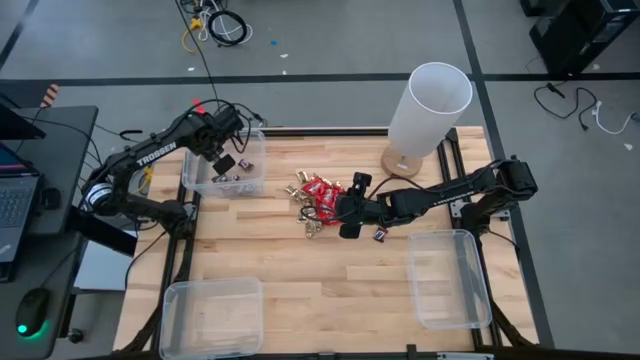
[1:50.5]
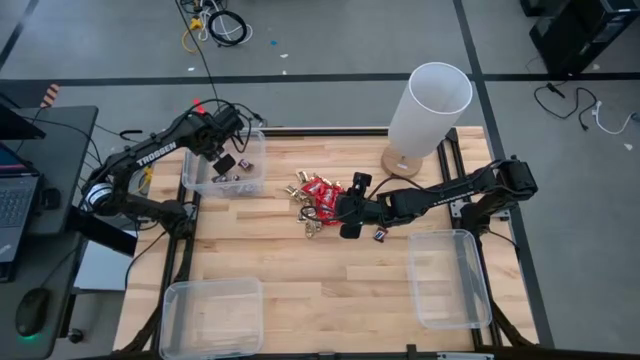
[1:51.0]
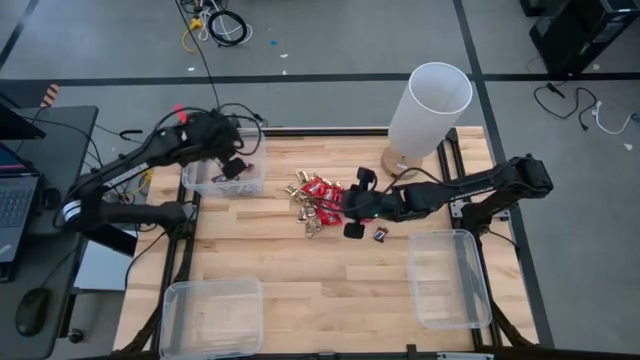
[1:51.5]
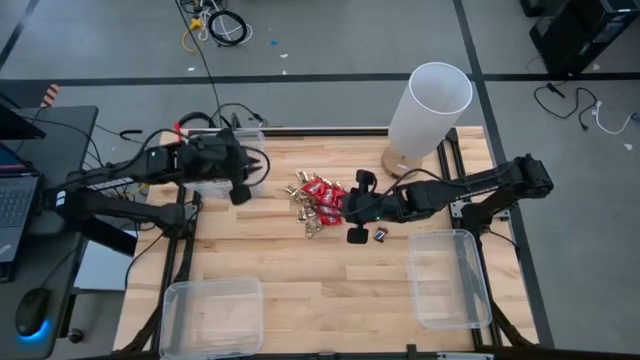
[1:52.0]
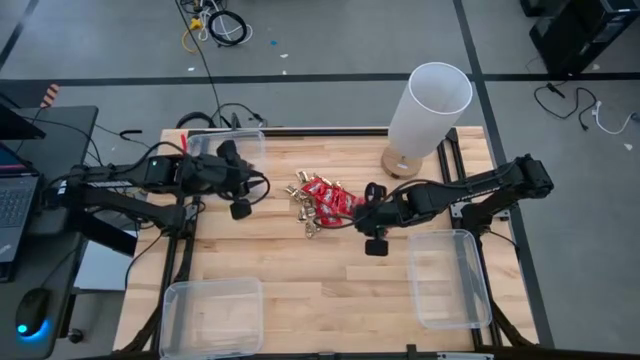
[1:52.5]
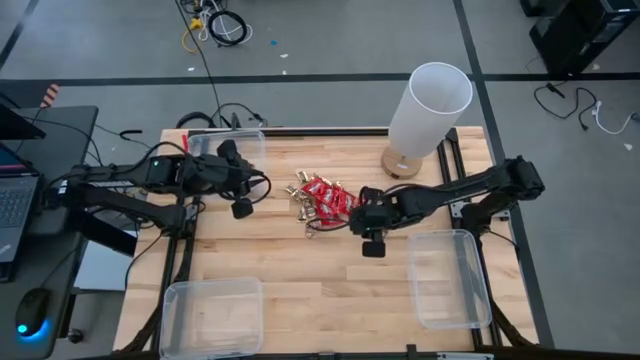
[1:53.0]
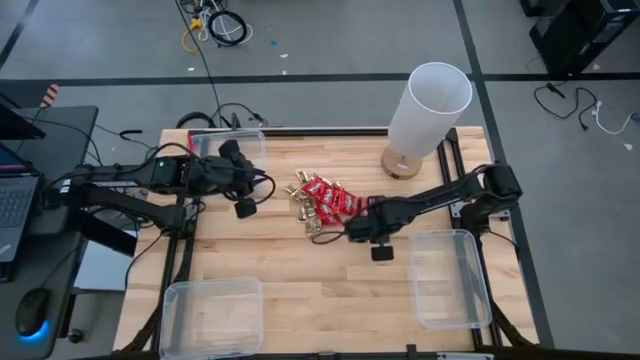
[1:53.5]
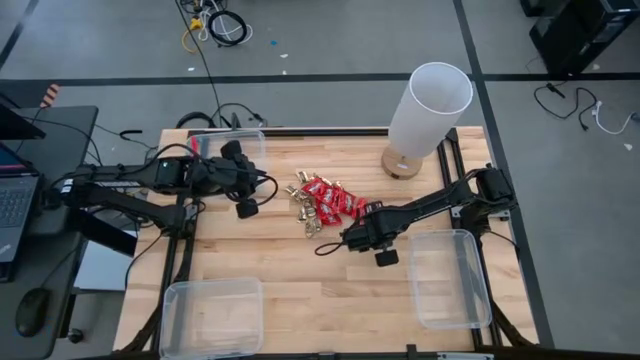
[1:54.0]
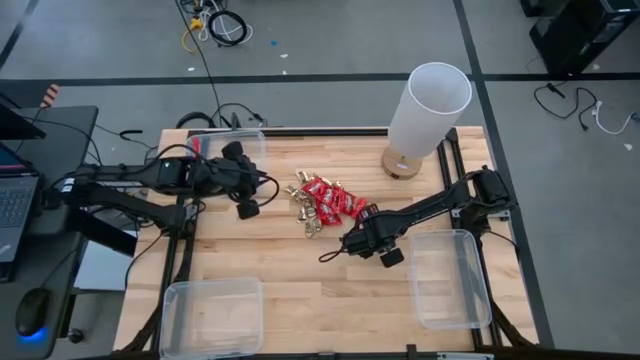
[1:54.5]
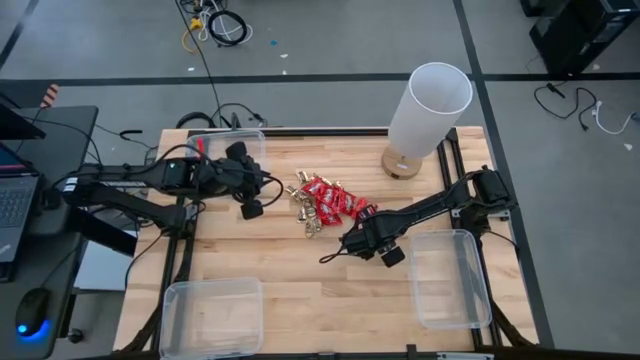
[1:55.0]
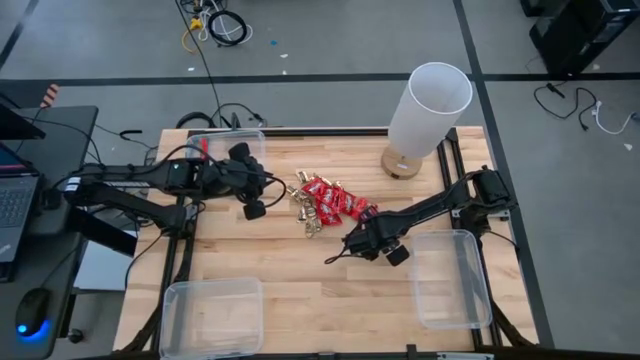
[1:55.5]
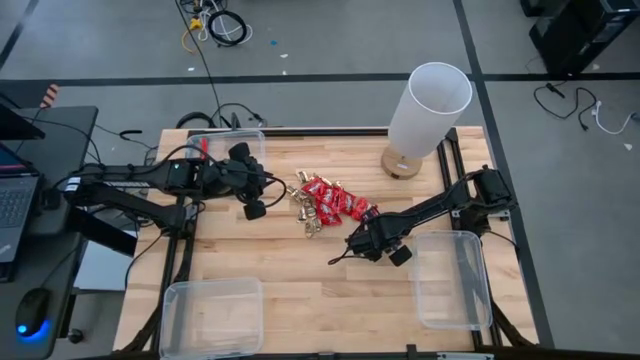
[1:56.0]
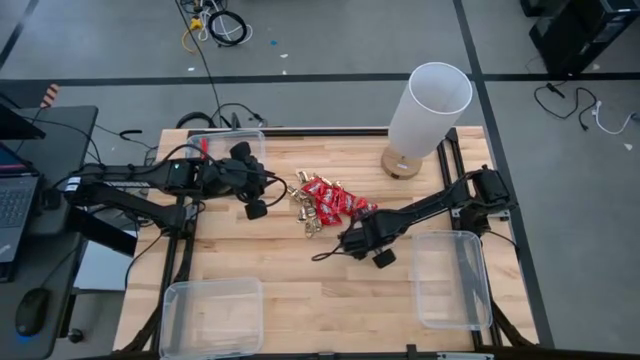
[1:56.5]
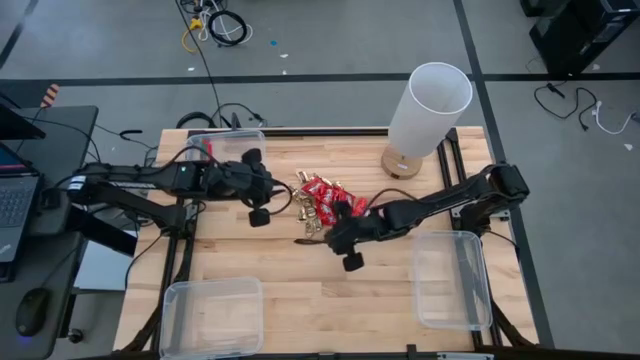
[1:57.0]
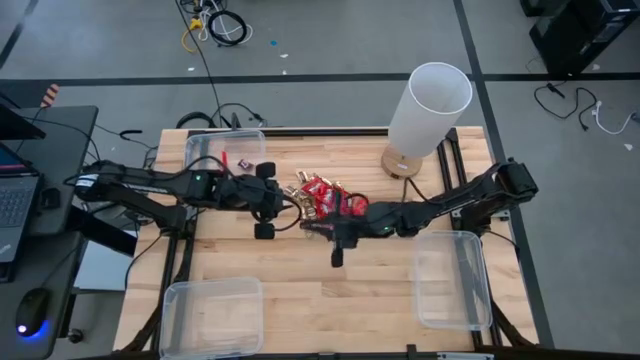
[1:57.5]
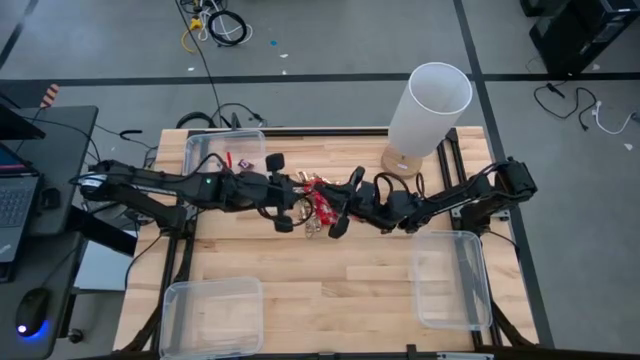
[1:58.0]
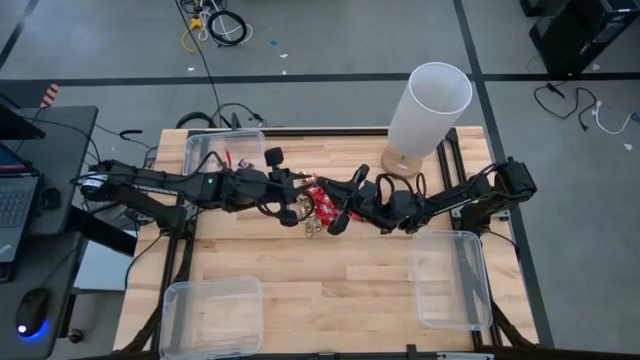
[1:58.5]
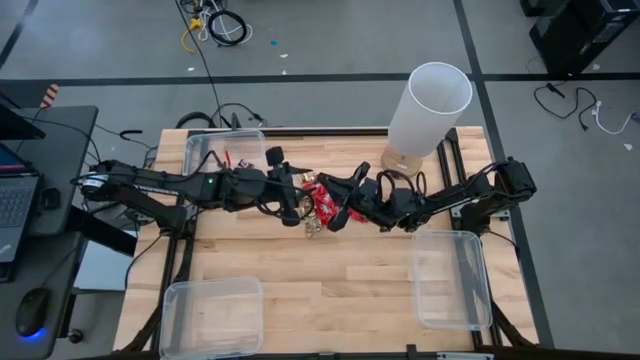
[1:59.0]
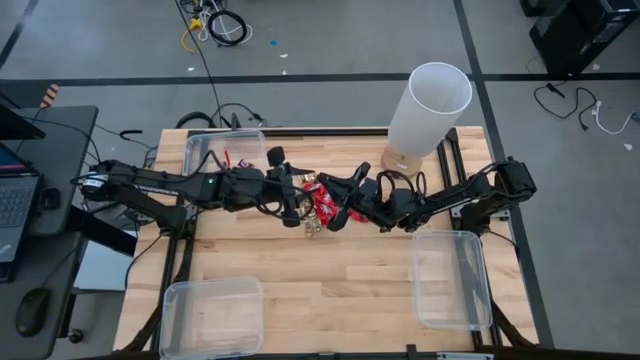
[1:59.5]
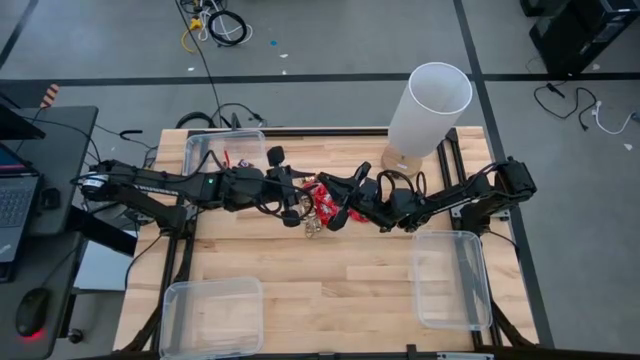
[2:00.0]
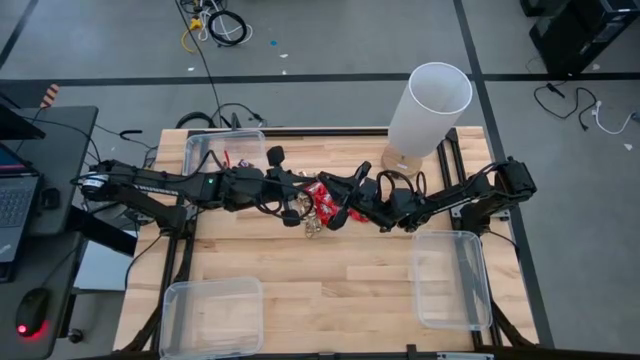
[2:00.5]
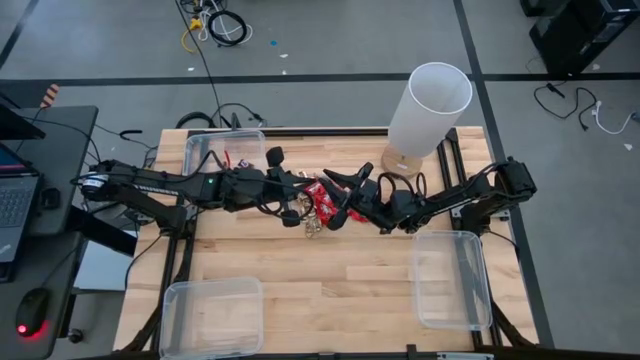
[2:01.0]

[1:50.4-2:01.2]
Task: Sort candy
Put the brown chocolate into the top left transparent bin

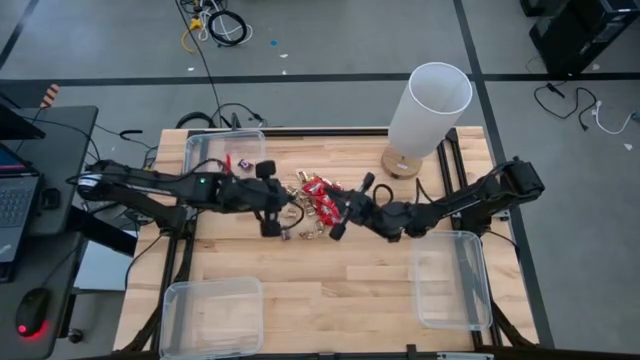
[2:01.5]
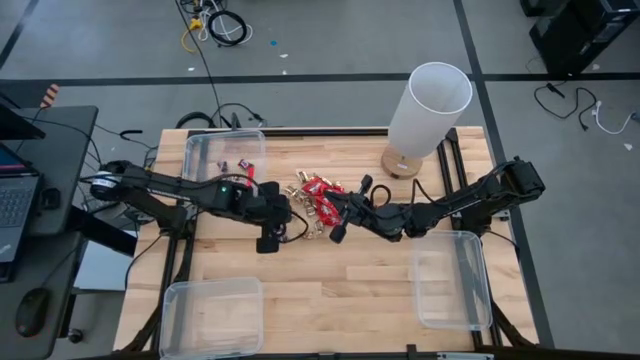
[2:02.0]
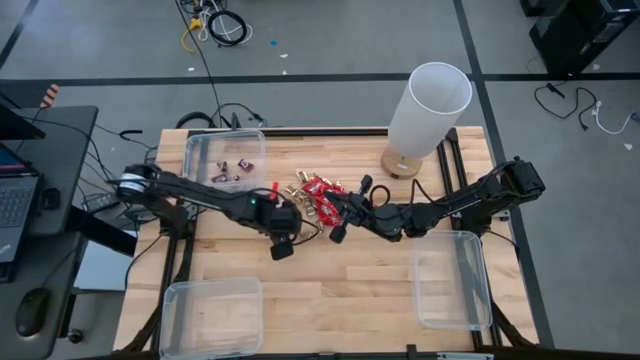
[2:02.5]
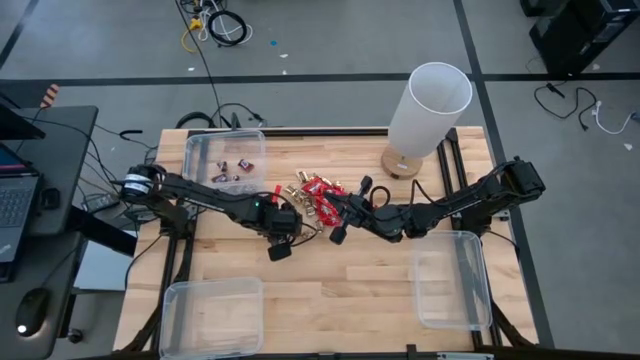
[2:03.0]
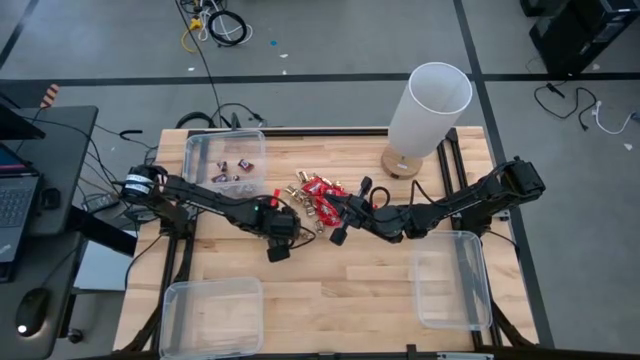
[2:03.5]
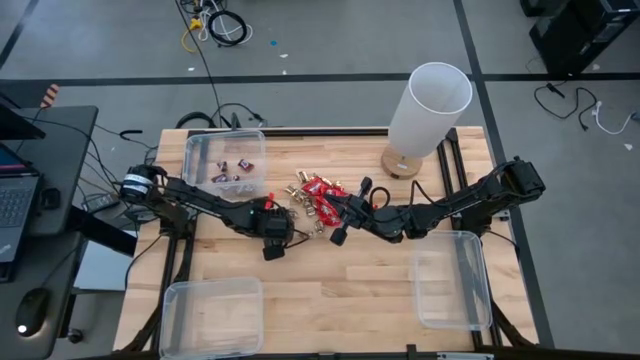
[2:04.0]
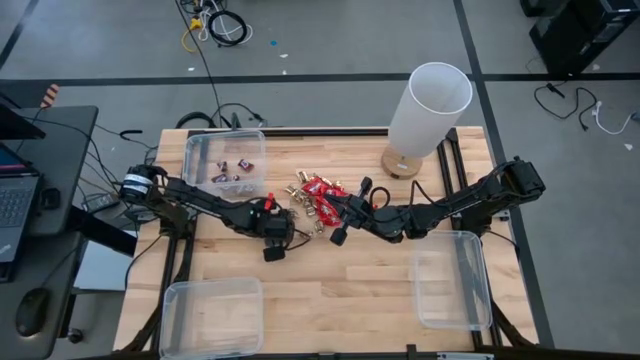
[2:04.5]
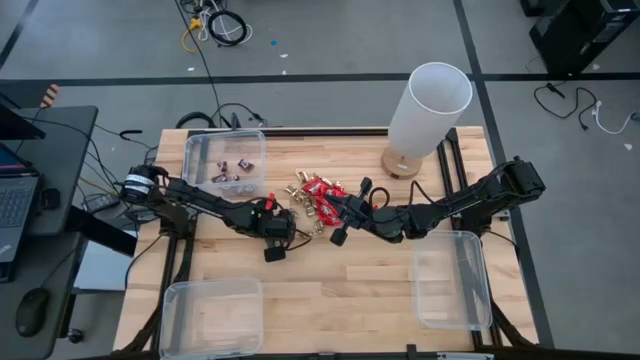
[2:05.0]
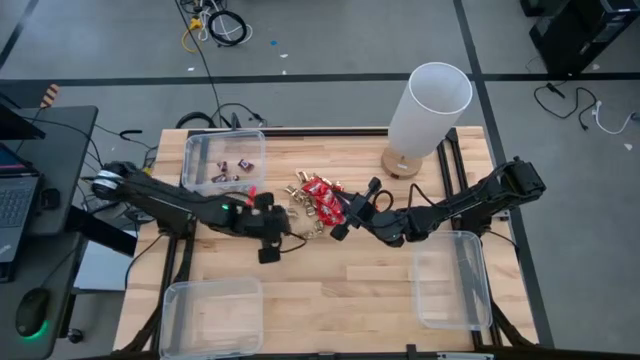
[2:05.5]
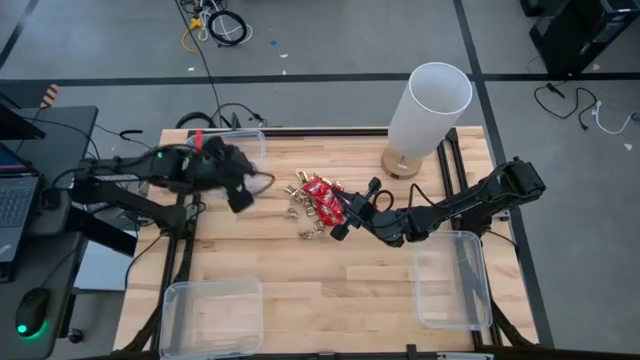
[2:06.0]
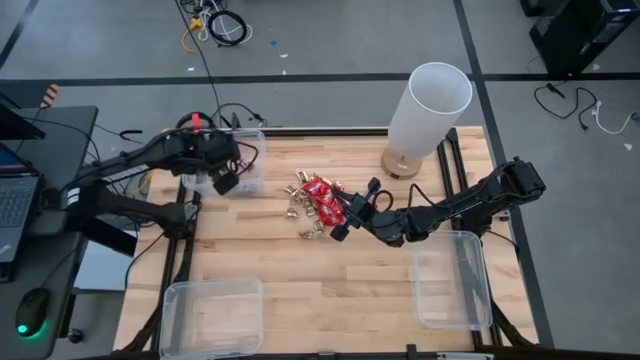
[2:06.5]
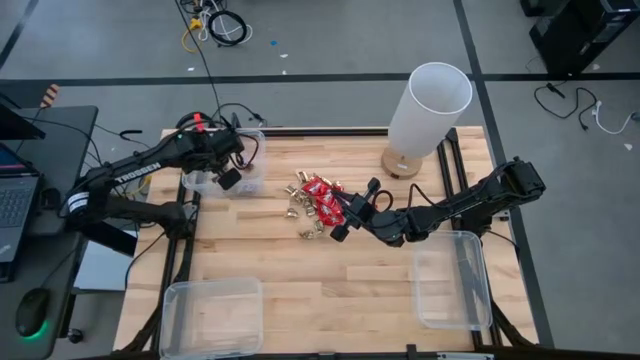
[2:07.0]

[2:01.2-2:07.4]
Put the brown chocolate into the top left transparent bin

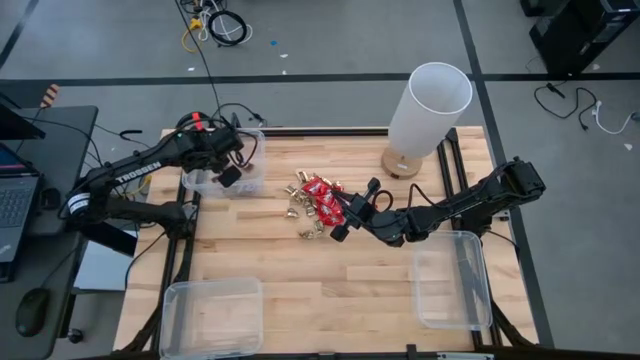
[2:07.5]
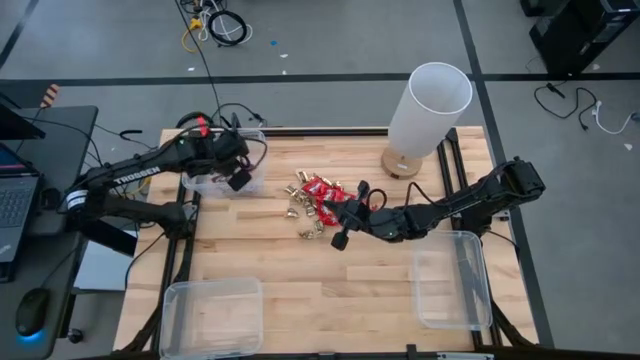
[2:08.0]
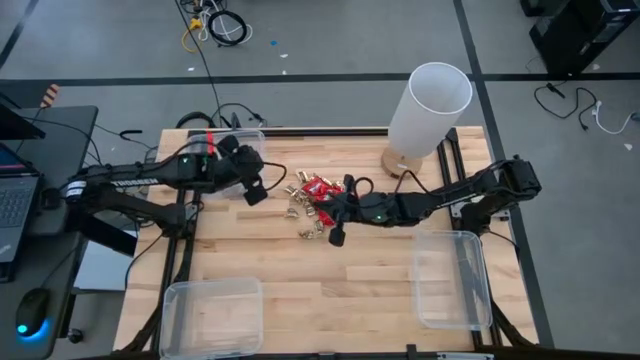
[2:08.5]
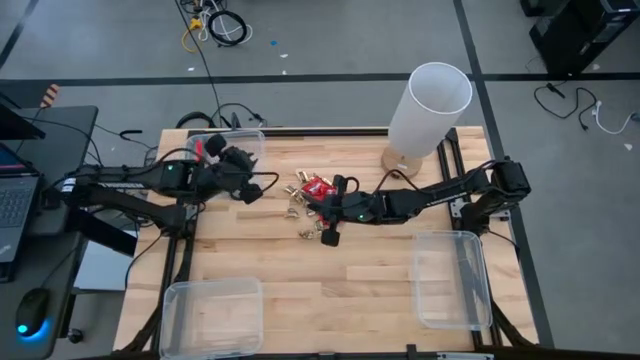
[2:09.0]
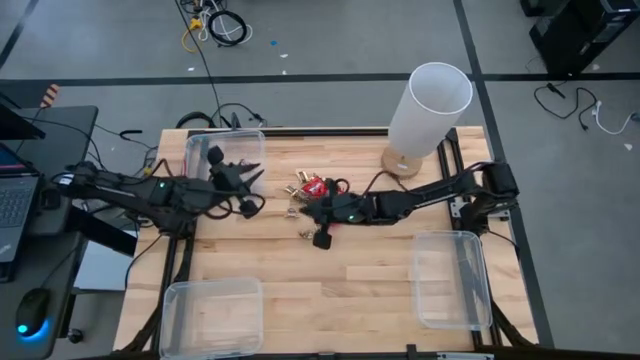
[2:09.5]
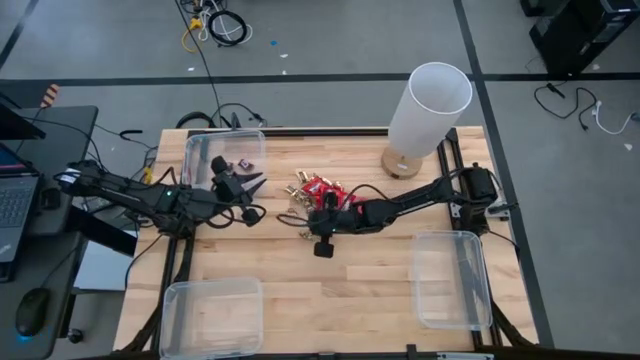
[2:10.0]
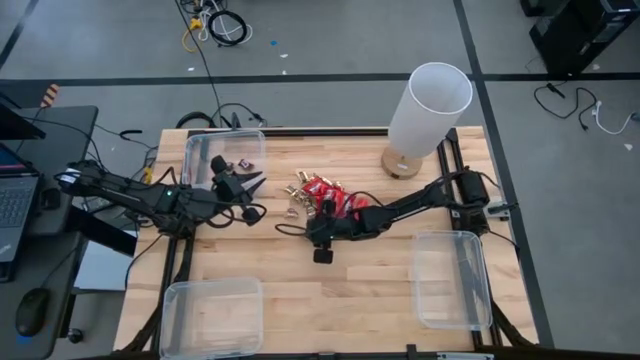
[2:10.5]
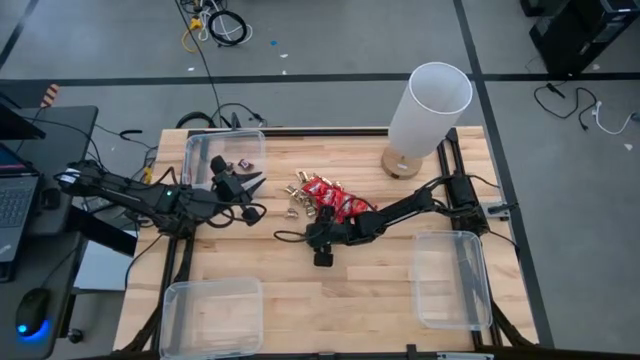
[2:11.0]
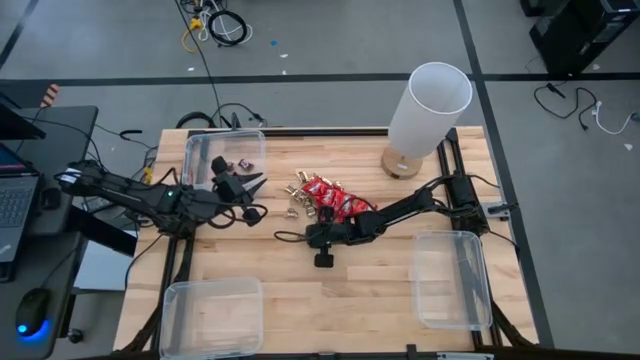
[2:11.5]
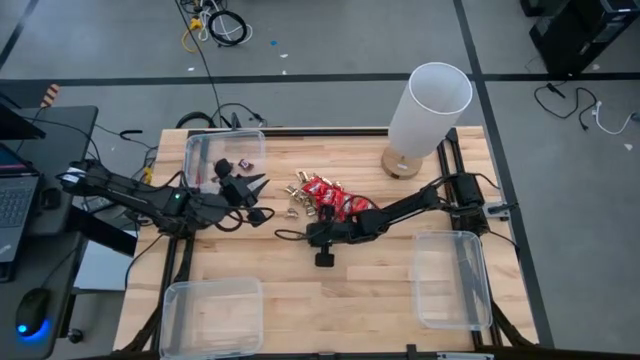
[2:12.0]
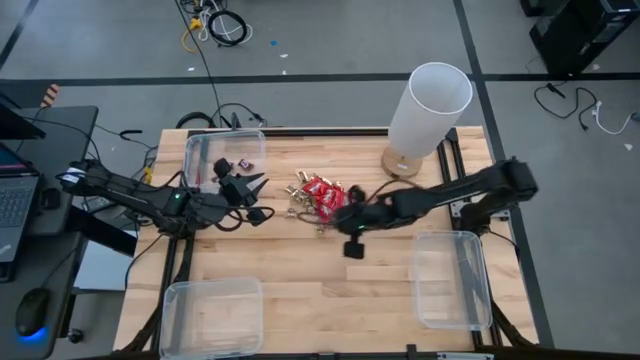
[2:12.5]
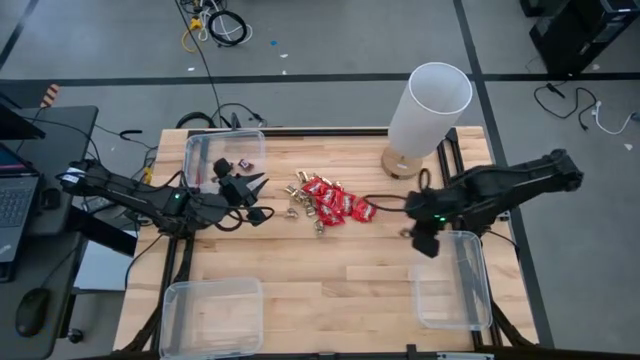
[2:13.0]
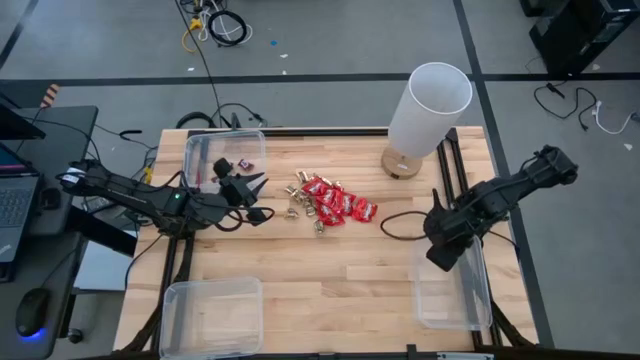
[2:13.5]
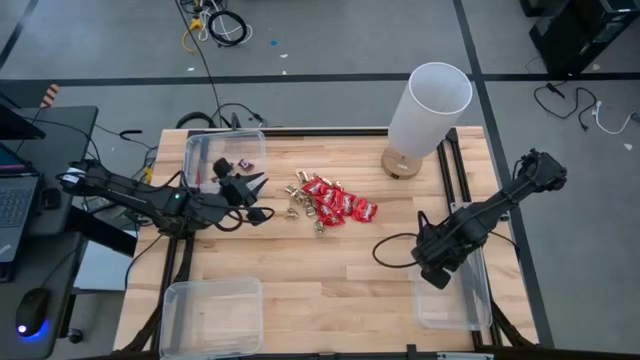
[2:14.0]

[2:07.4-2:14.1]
Put the gold chocolate into the bottom right transparent bin
